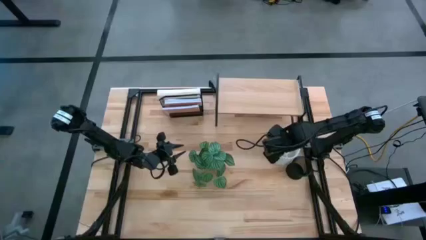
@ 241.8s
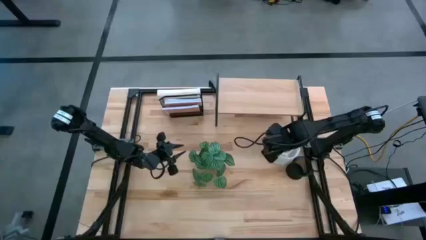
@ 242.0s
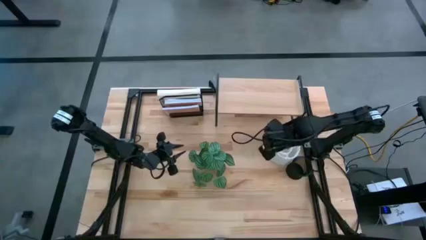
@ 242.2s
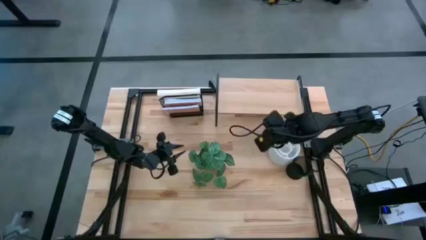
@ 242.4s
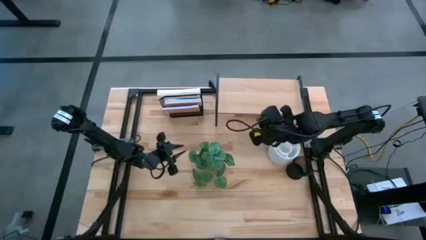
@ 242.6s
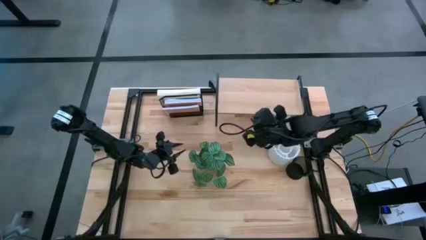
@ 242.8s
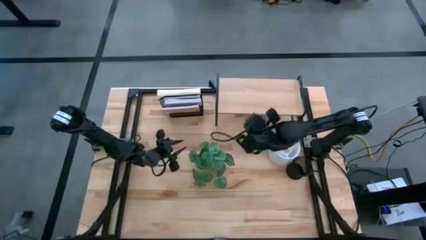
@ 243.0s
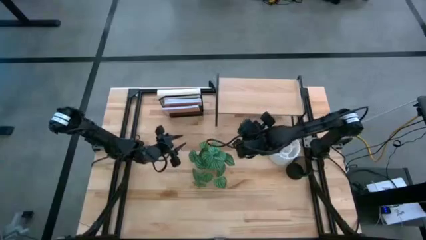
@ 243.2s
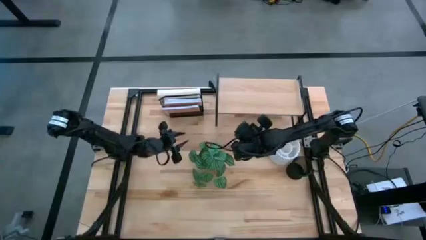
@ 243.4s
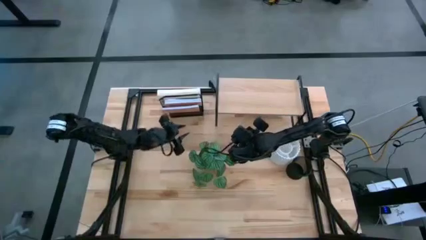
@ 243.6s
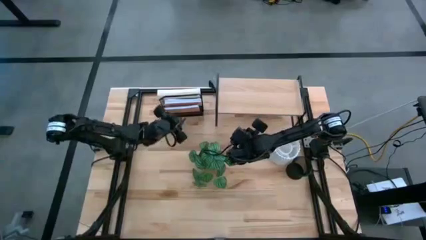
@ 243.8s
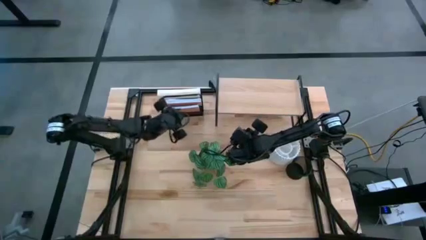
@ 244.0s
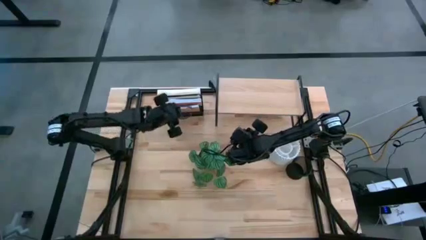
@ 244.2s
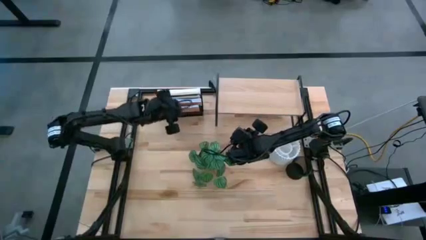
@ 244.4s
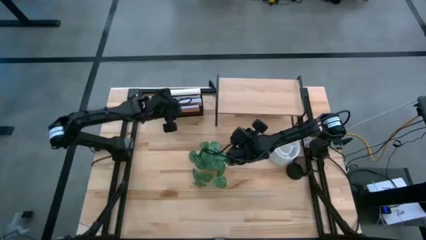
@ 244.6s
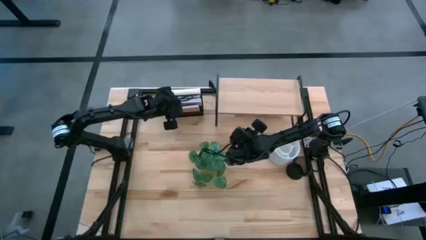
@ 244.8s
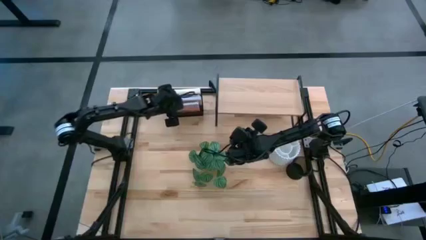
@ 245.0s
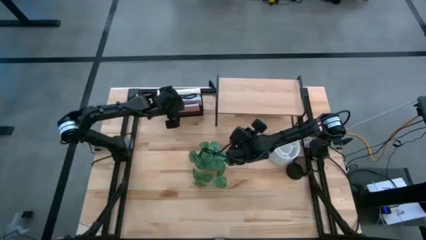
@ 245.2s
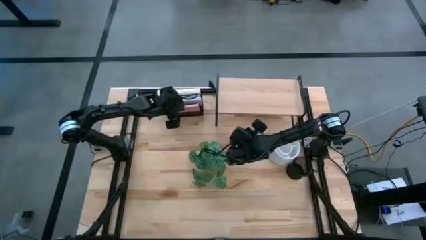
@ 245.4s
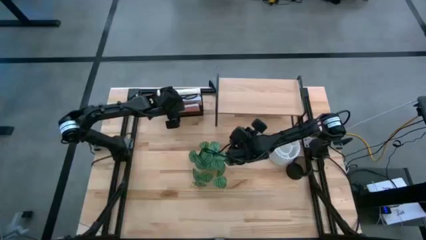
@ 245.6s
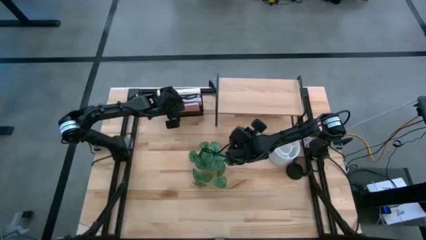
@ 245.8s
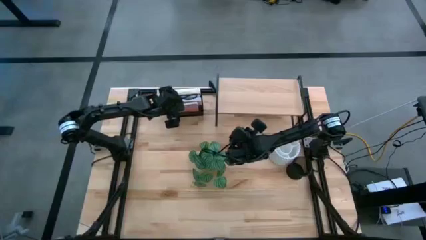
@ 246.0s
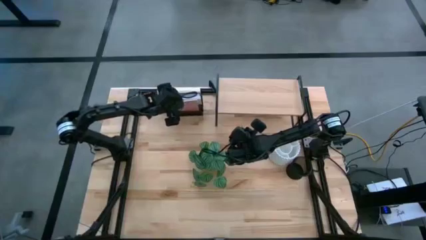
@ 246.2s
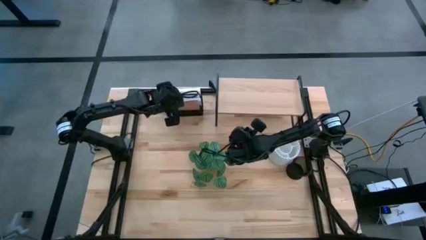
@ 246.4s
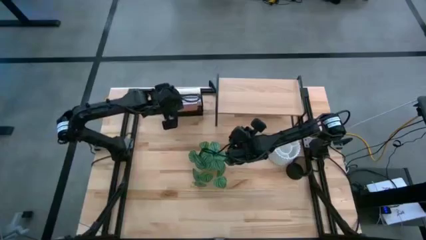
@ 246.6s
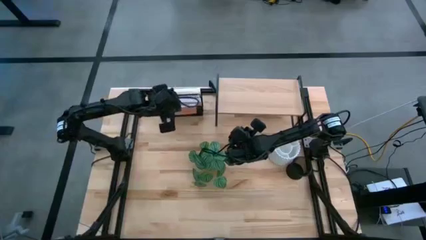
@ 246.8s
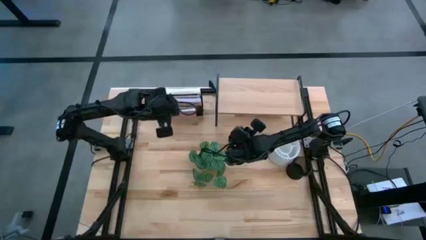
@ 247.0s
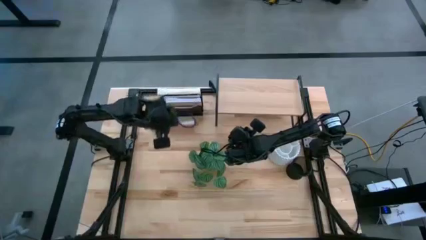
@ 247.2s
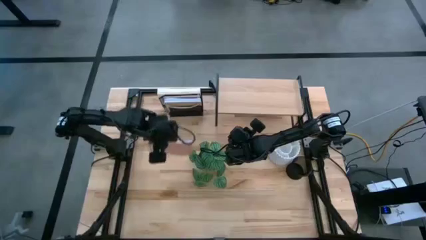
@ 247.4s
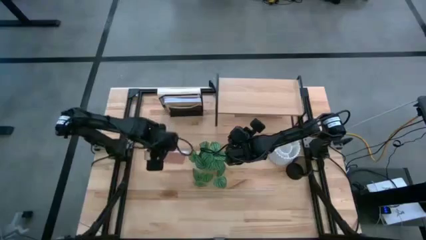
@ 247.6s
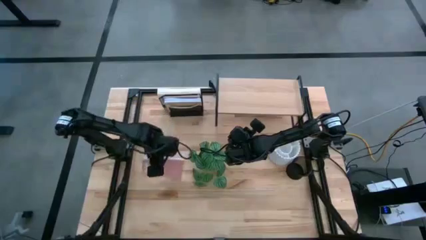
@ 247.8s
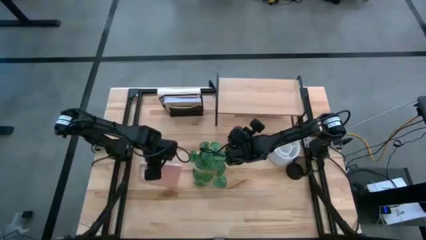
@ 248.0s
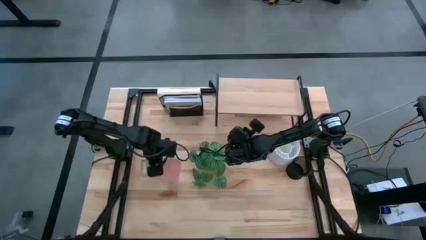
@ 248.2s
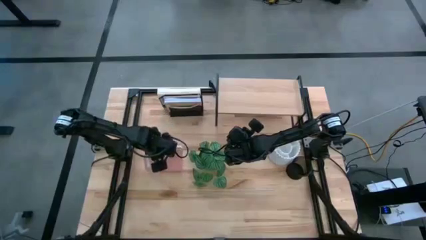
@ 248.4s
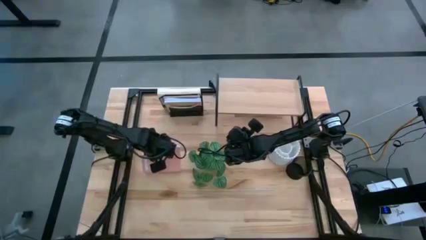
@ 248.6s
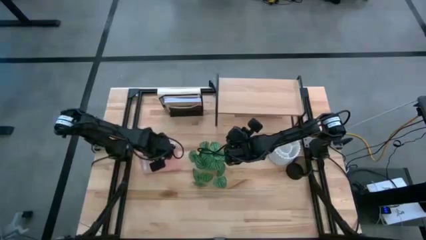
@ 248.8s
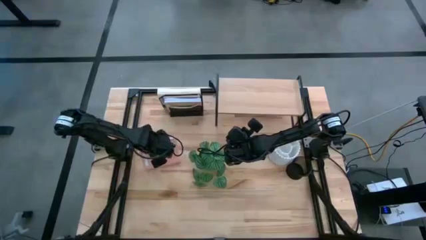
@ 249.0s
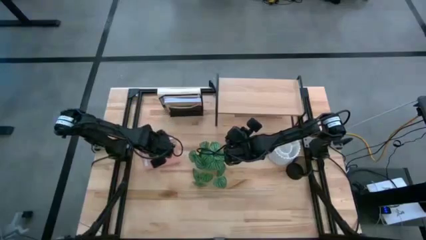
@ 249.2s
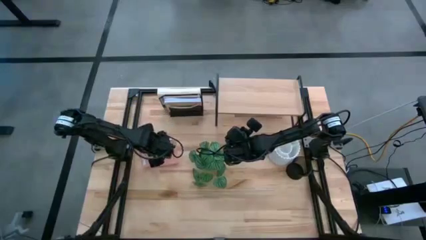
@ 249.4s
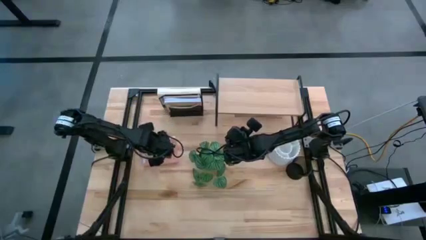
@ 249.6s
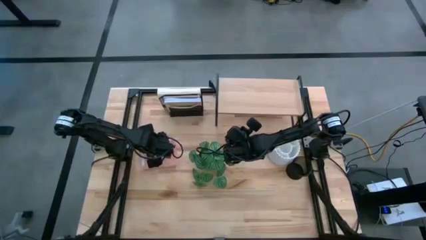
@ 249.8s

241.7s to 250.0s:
Task: Stock shelves
Remove the pink notebook from the black mesh bookshelf

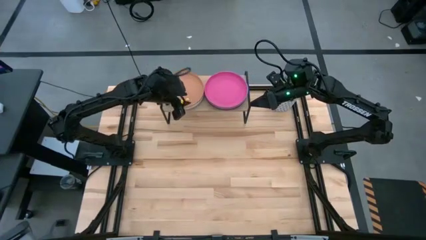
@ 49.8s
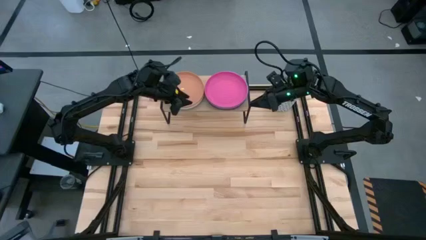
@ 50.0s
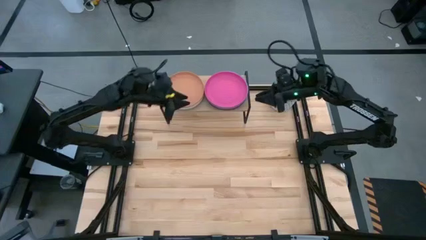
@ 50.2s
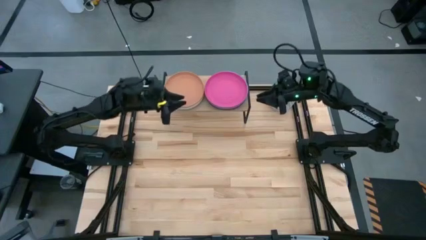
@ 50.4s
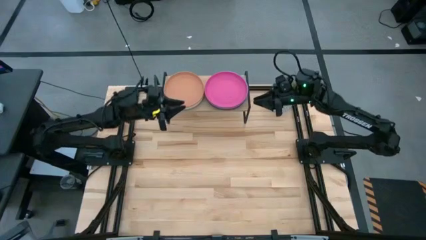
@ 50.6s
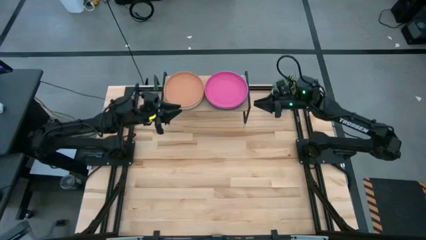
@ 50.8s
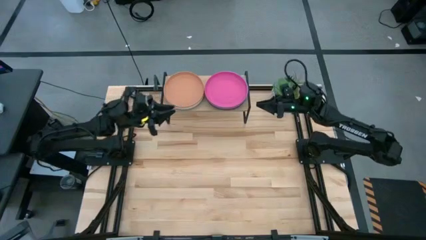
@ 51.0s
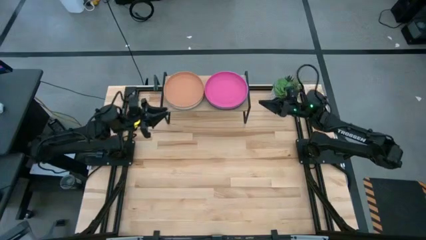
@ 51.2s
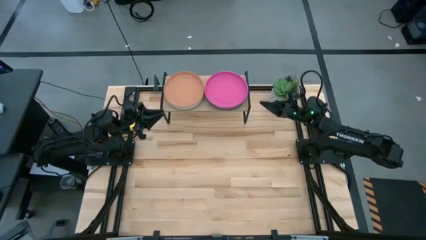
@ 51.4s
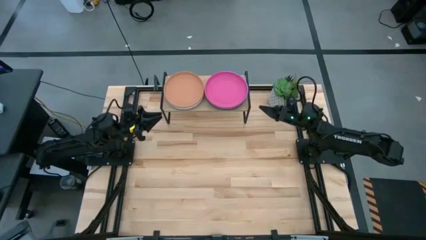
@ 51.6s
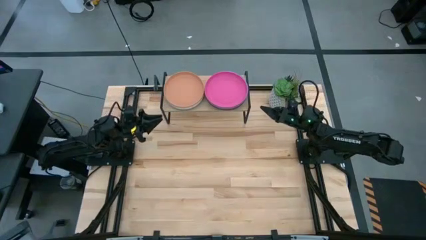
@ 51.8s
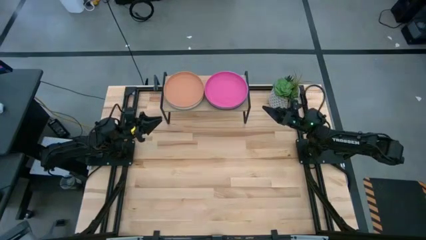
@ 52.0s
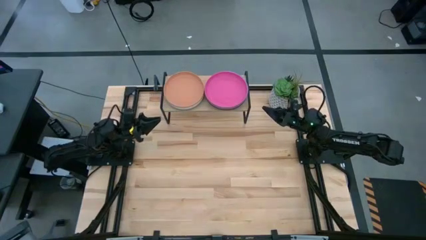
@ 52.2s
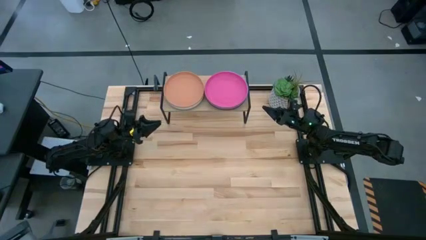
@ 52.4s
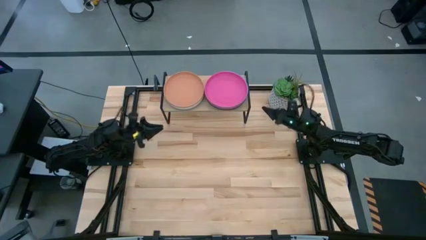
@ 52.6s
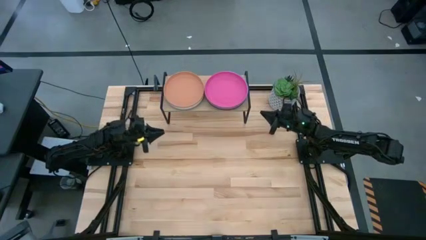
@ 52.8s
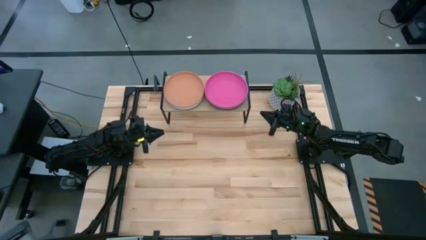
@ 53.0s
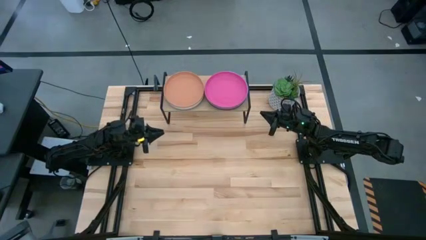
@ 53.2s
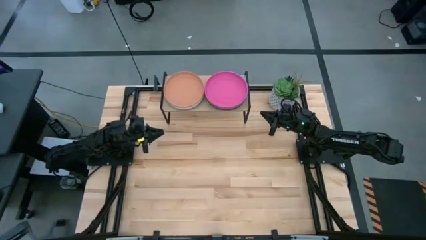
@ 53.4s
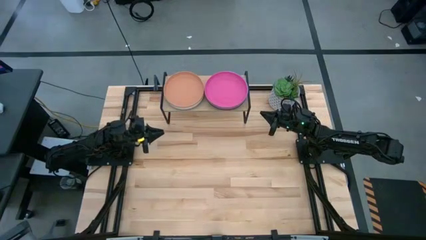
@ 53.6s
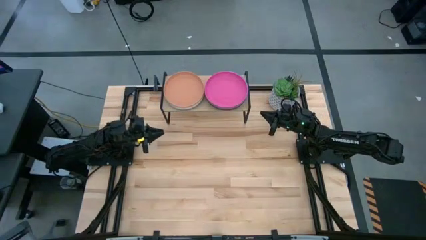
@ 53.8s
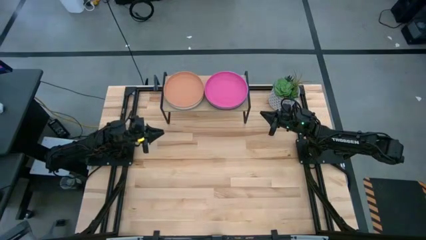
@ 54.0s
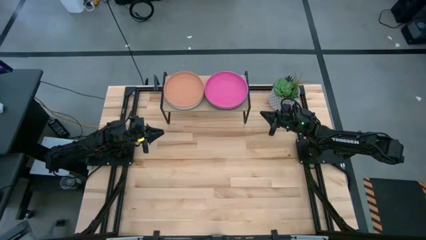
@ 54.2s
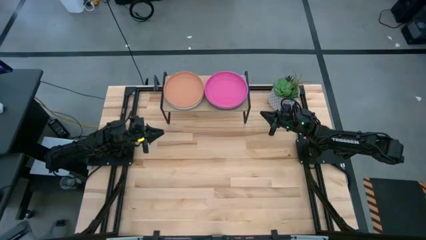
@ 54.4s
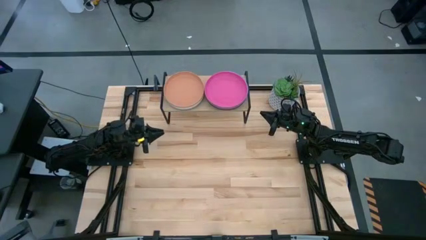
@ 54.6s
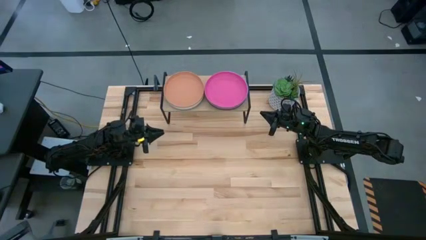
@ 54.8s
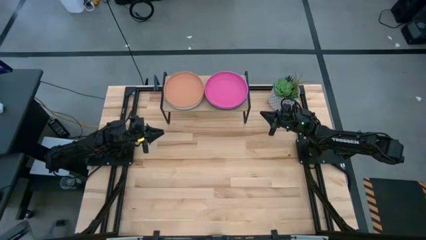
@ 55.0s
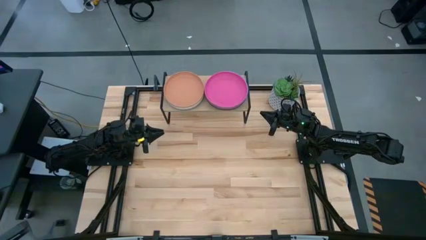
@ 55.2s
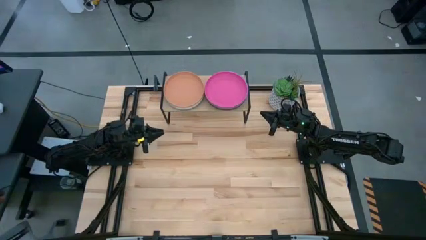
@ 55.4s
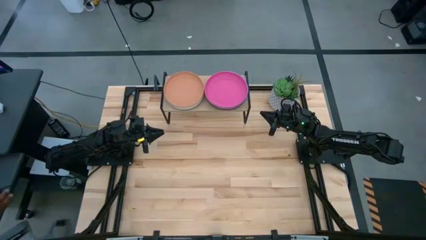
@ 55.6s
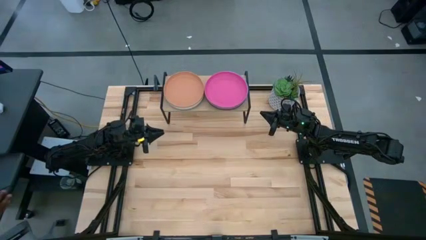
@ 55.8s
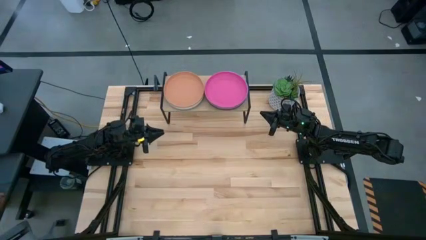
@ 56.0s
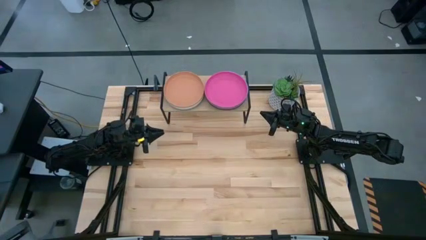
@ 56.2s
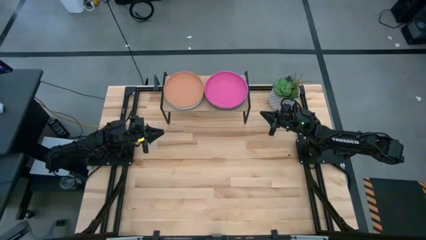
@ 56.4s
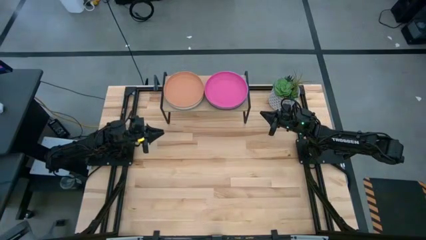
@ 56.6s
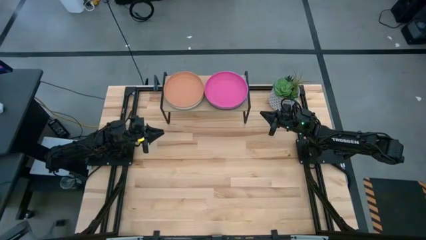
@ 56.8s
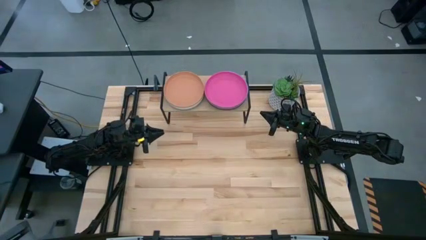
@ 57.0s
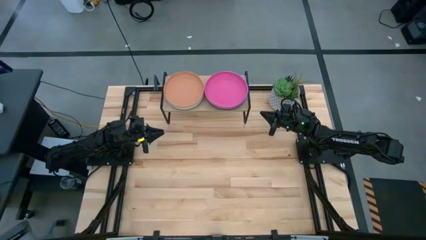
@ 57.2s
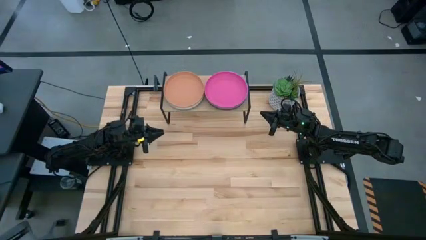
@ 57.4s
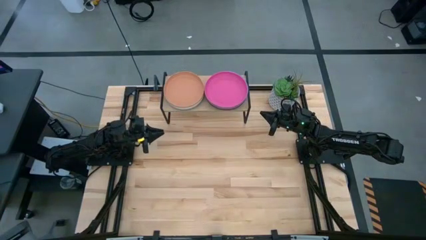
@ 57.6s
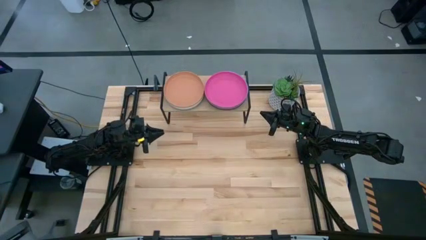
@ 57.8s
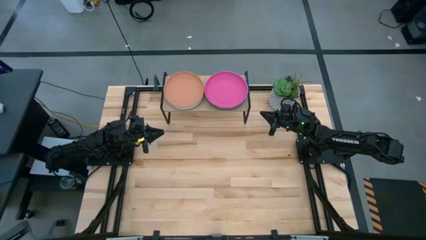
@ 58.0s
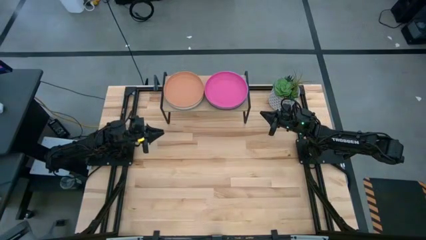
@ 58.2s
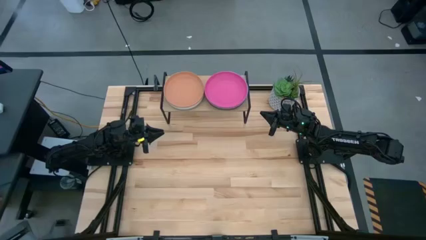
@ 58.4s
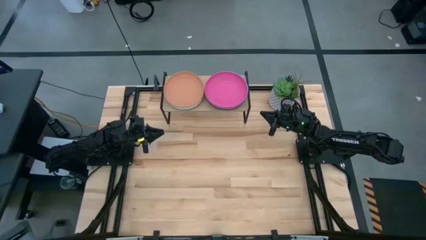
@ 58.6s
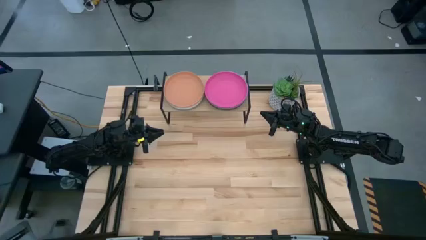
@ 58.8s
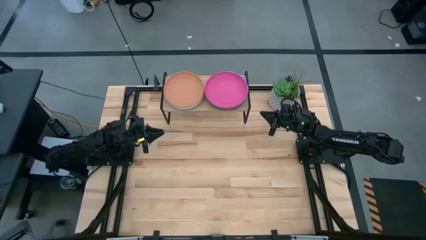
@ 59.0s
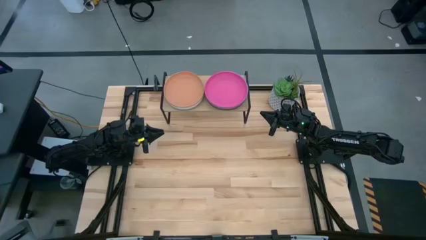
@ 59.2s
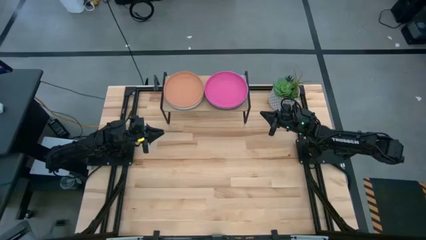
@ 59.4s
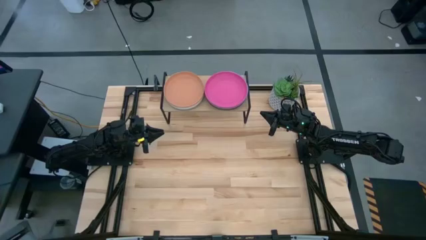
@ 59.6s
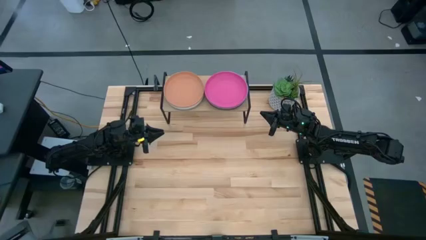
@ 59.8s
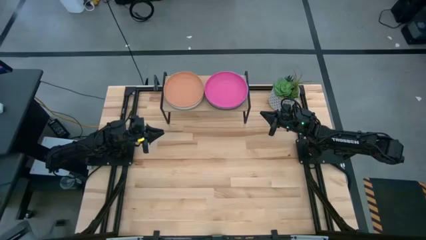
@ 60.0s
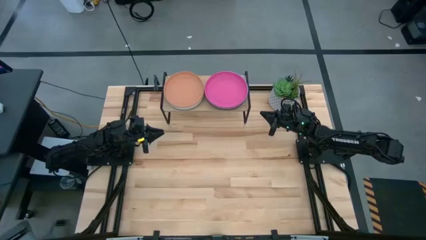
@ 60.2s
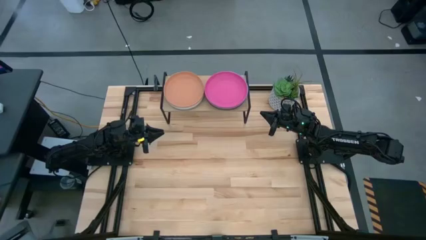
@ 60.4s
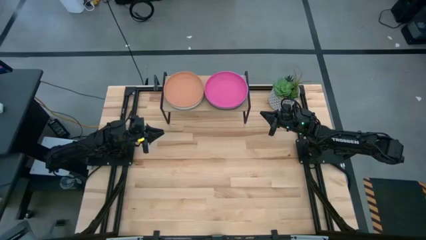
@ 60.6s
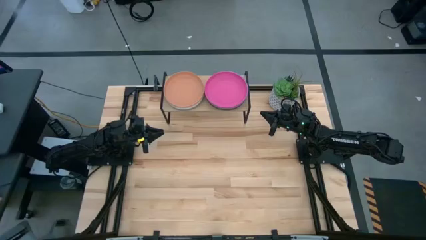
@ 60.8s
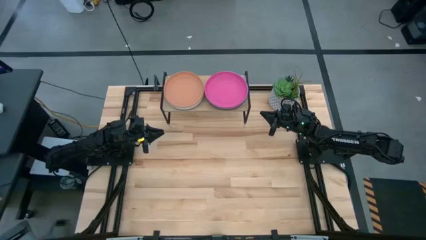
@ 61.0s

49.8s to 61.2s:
Task: Place and stack plates onto a shelf
Return to Home Position
